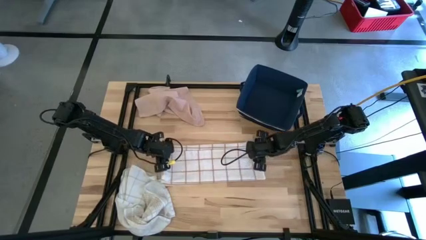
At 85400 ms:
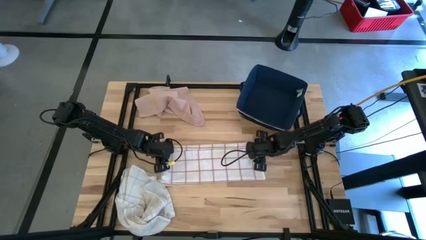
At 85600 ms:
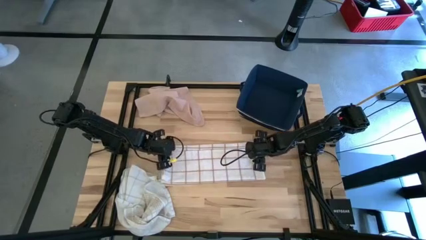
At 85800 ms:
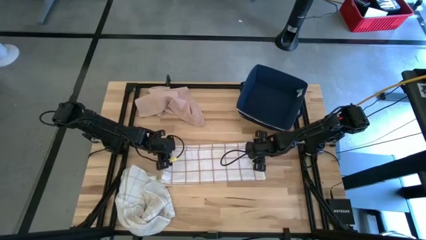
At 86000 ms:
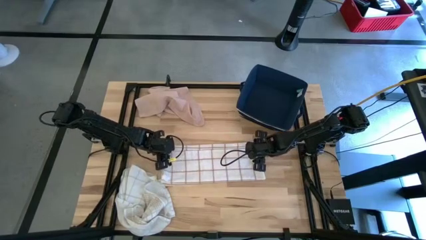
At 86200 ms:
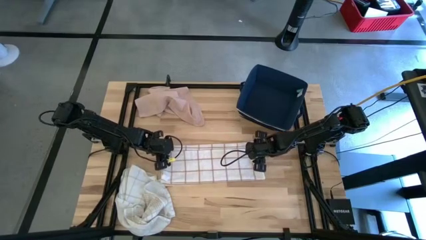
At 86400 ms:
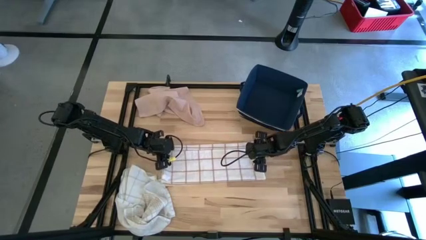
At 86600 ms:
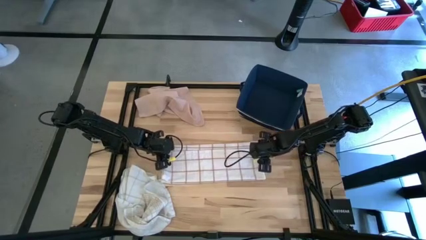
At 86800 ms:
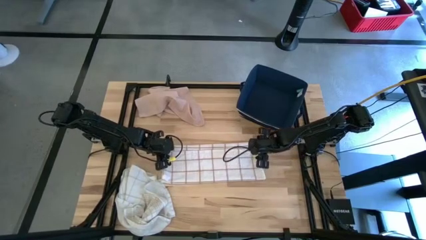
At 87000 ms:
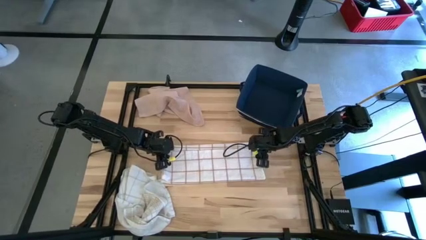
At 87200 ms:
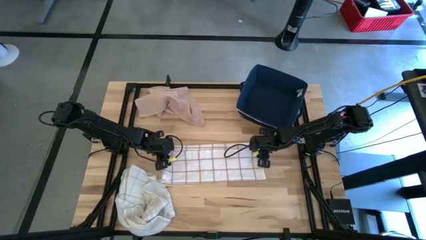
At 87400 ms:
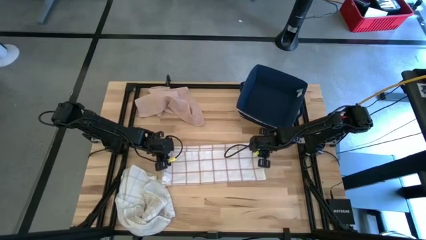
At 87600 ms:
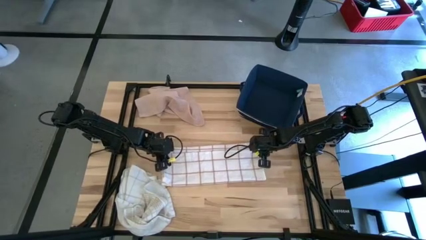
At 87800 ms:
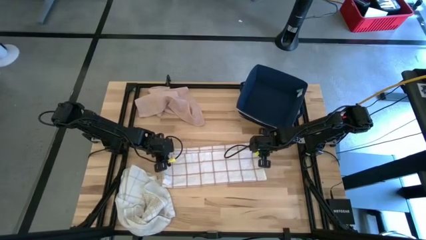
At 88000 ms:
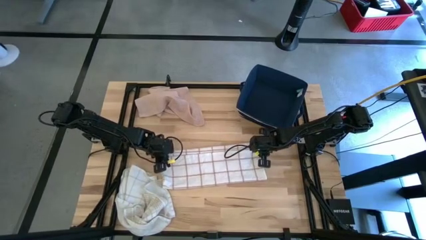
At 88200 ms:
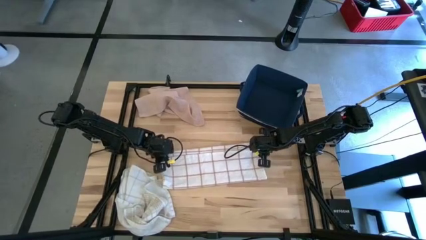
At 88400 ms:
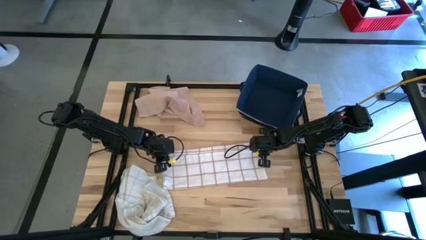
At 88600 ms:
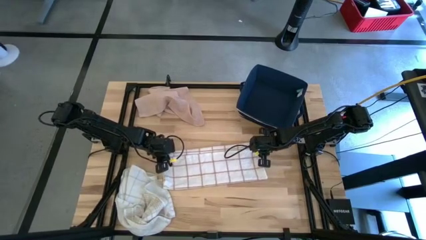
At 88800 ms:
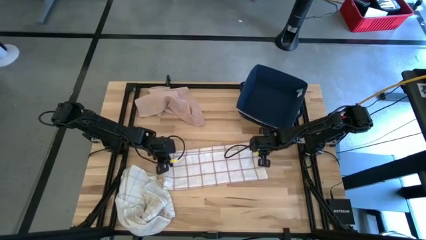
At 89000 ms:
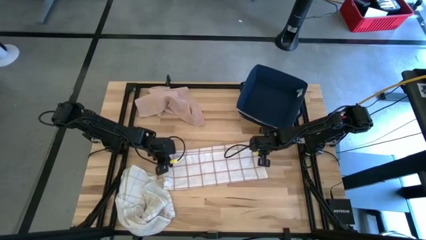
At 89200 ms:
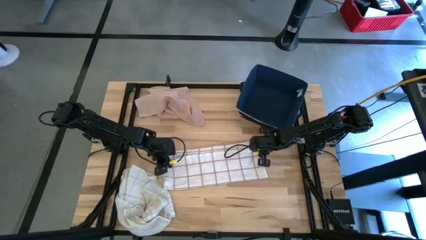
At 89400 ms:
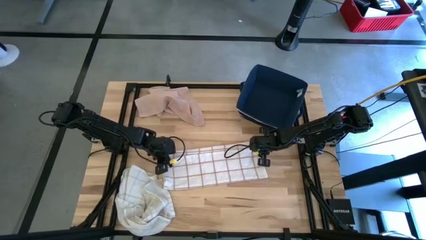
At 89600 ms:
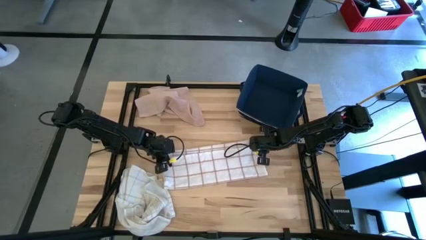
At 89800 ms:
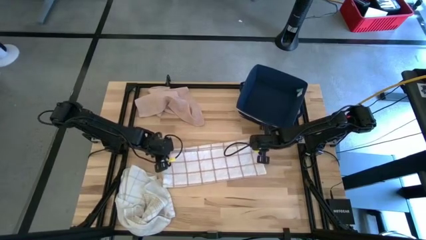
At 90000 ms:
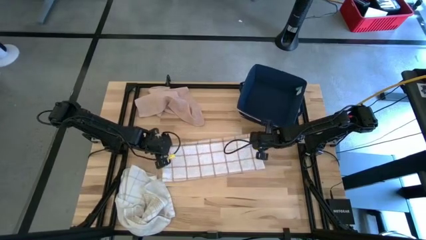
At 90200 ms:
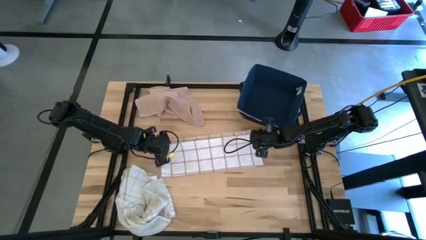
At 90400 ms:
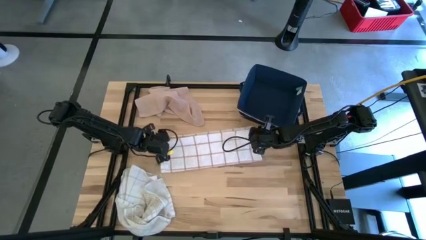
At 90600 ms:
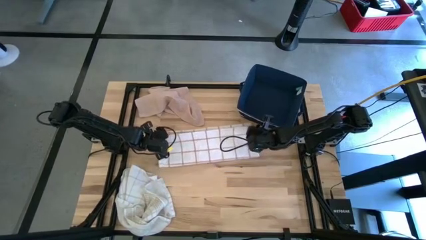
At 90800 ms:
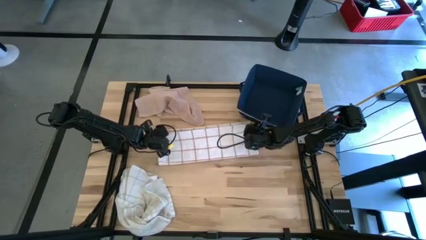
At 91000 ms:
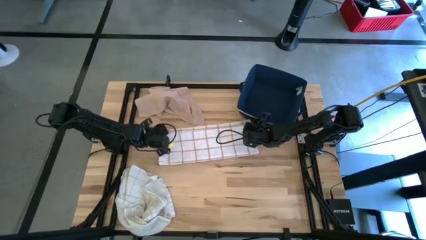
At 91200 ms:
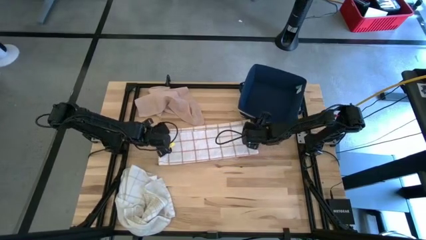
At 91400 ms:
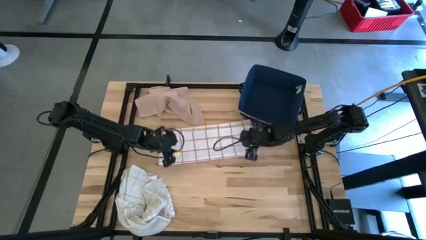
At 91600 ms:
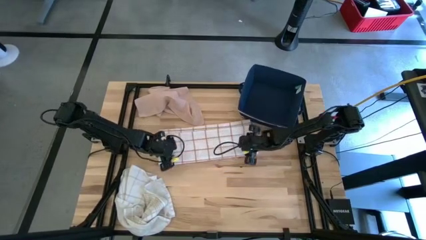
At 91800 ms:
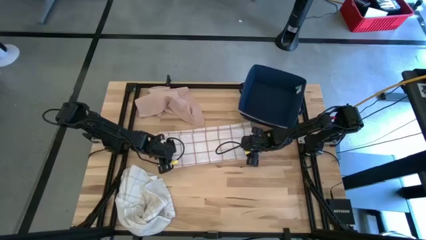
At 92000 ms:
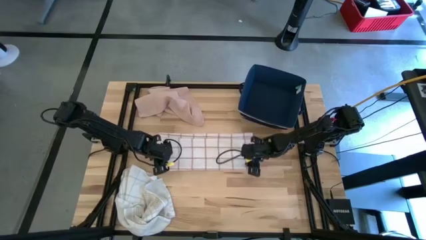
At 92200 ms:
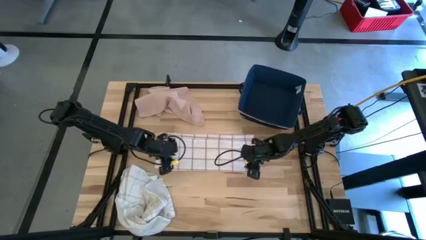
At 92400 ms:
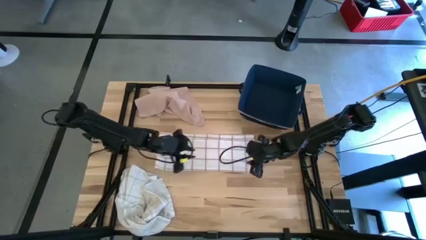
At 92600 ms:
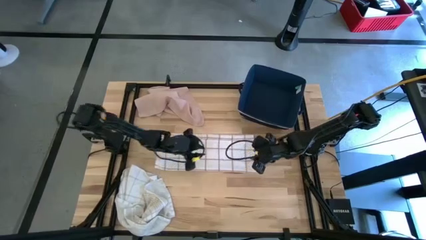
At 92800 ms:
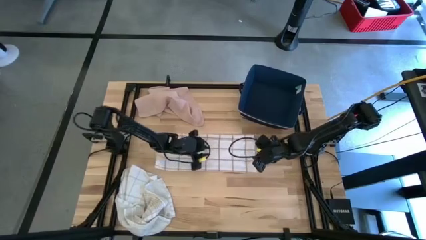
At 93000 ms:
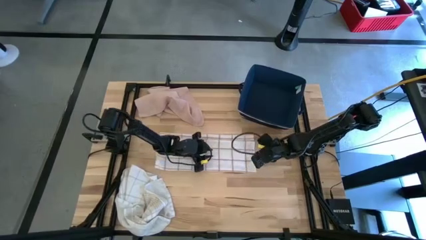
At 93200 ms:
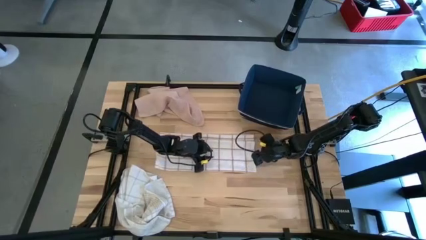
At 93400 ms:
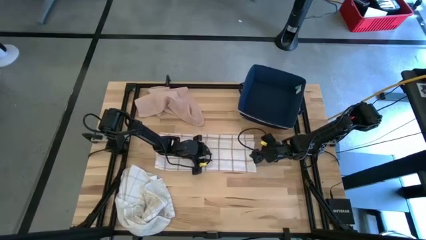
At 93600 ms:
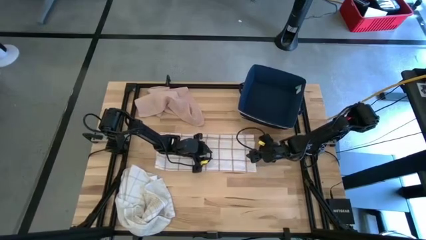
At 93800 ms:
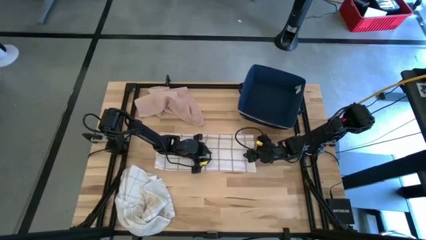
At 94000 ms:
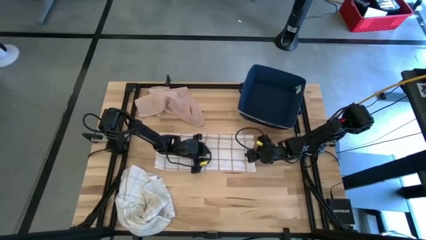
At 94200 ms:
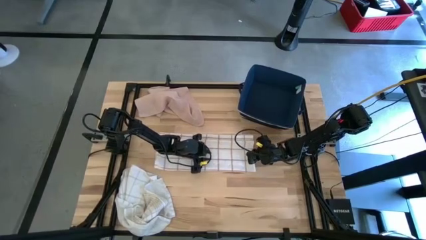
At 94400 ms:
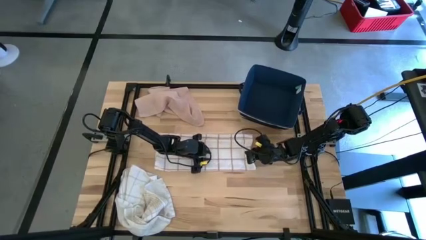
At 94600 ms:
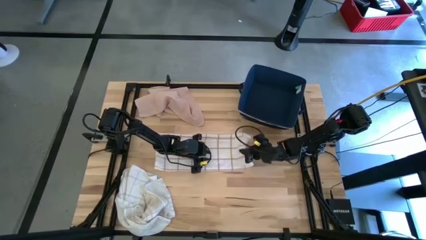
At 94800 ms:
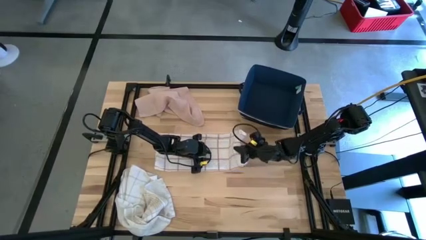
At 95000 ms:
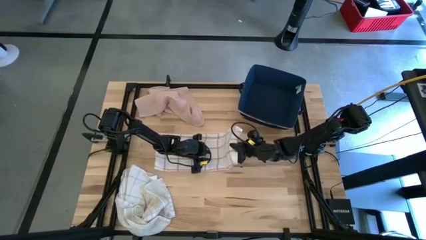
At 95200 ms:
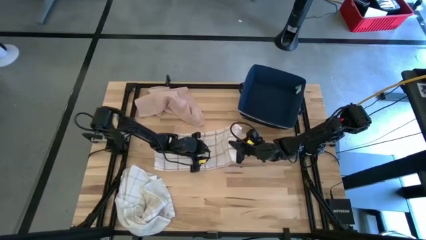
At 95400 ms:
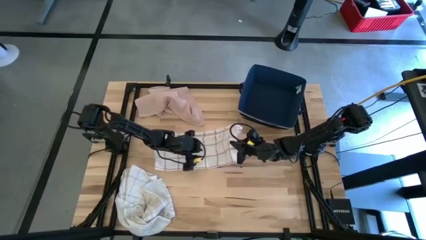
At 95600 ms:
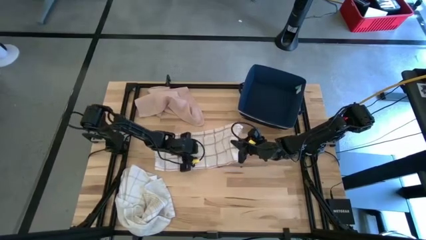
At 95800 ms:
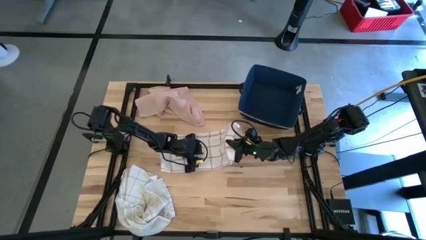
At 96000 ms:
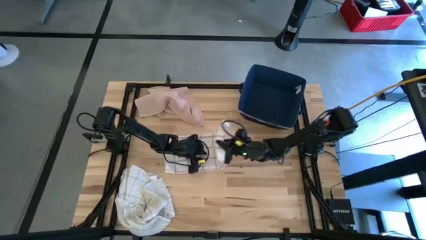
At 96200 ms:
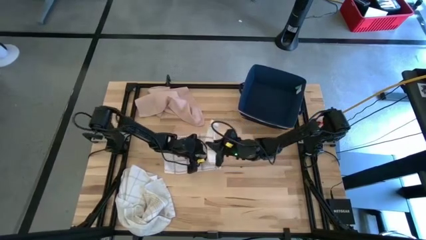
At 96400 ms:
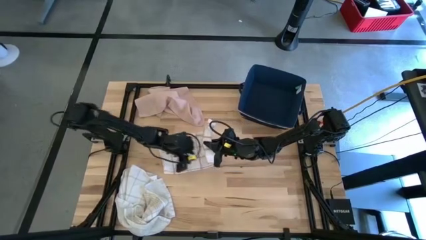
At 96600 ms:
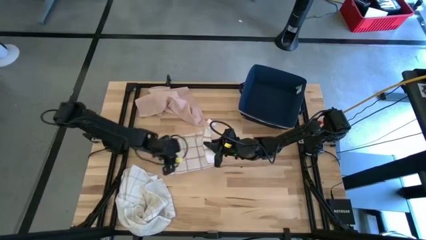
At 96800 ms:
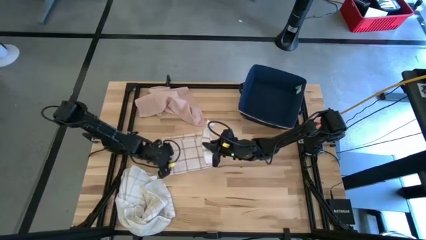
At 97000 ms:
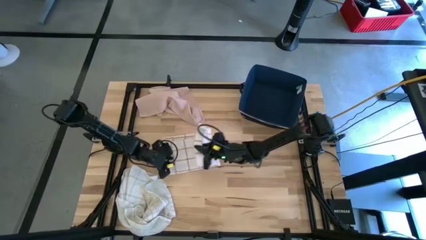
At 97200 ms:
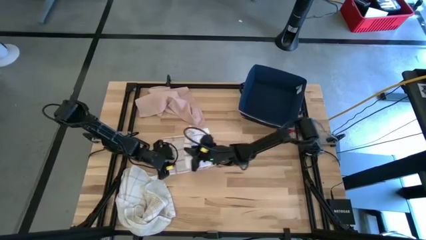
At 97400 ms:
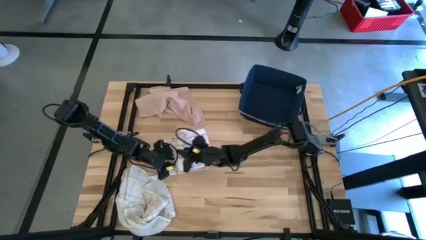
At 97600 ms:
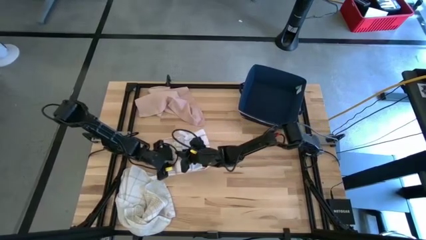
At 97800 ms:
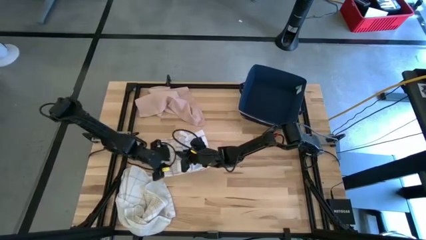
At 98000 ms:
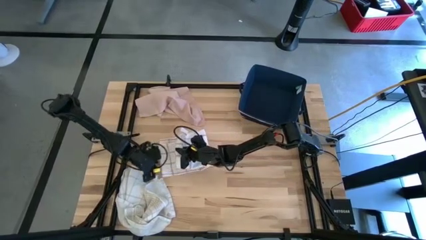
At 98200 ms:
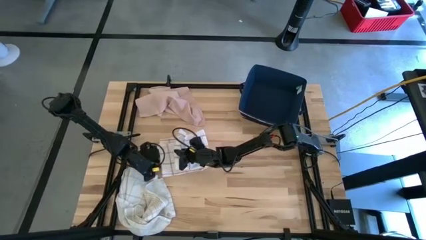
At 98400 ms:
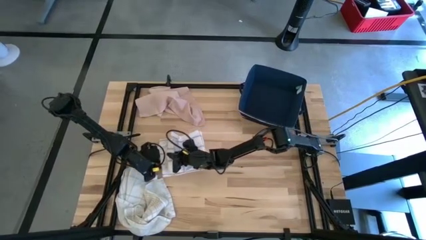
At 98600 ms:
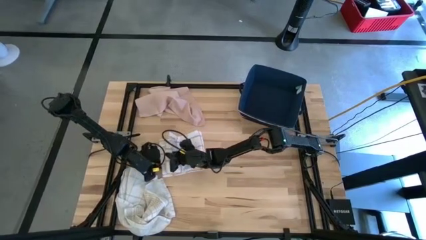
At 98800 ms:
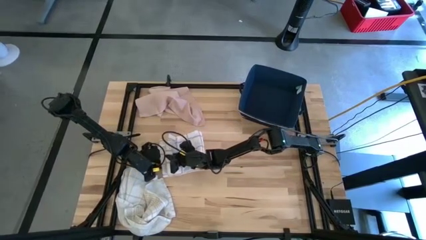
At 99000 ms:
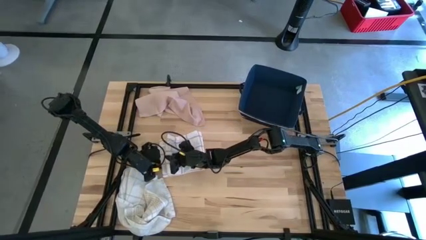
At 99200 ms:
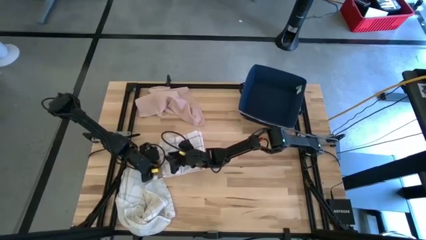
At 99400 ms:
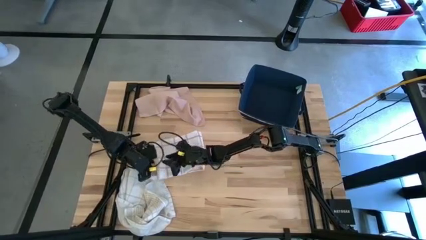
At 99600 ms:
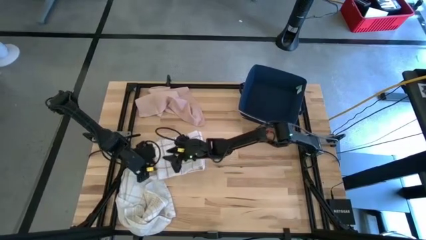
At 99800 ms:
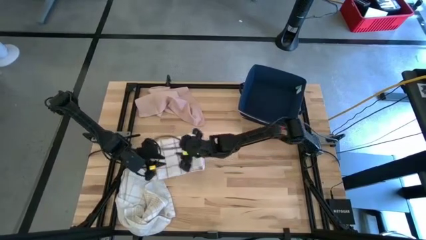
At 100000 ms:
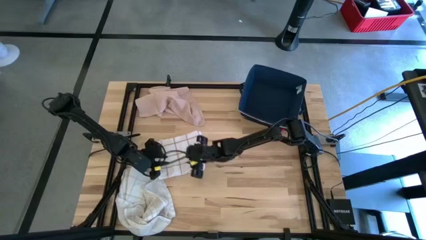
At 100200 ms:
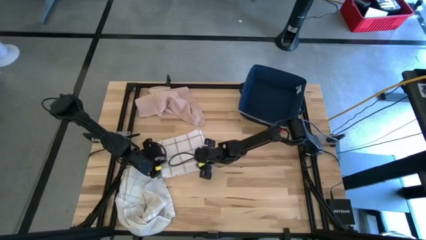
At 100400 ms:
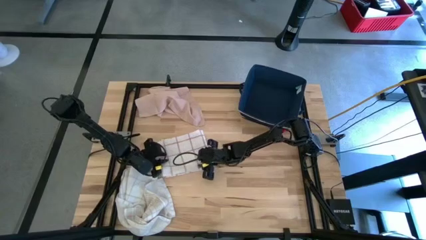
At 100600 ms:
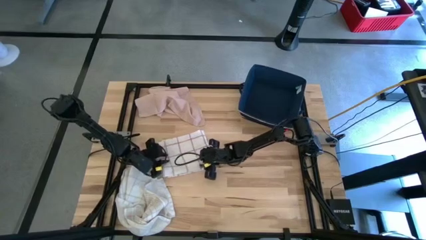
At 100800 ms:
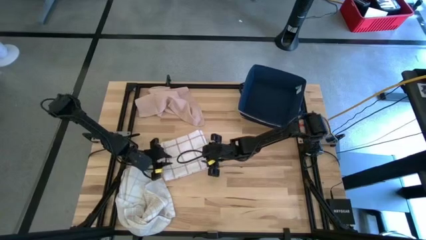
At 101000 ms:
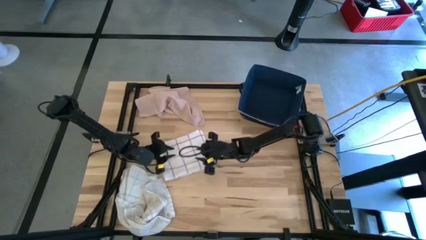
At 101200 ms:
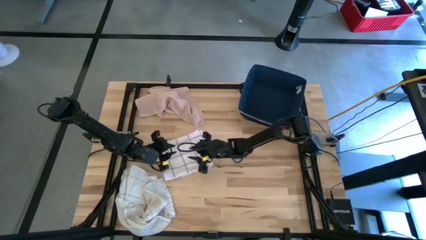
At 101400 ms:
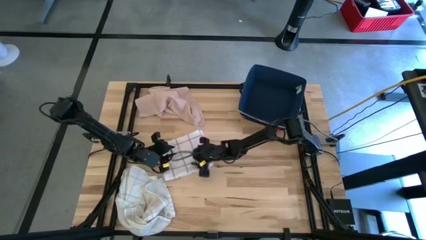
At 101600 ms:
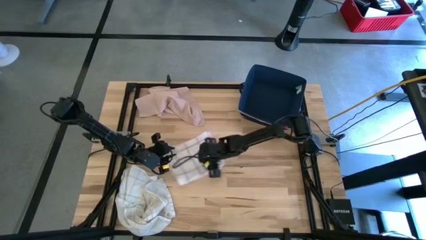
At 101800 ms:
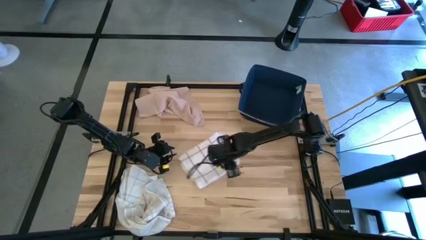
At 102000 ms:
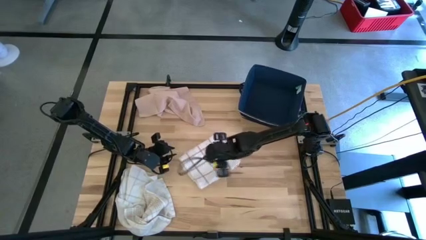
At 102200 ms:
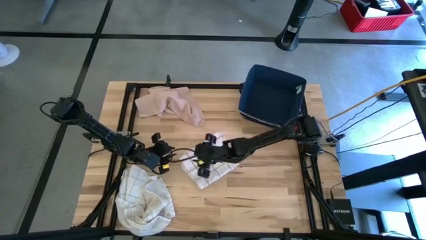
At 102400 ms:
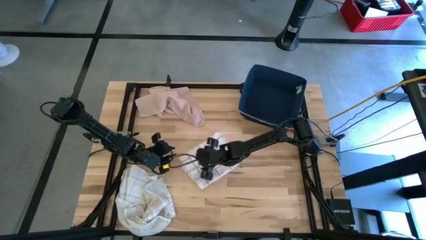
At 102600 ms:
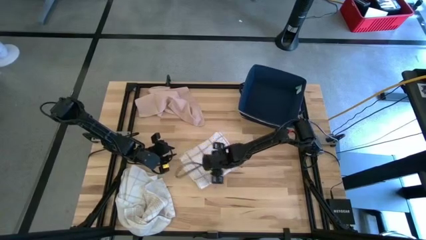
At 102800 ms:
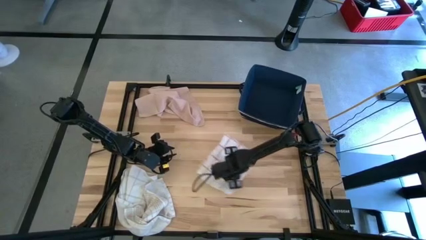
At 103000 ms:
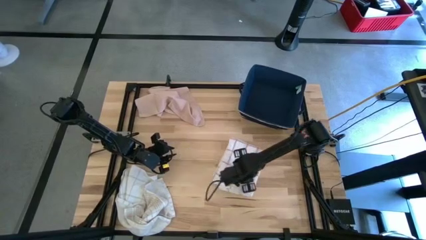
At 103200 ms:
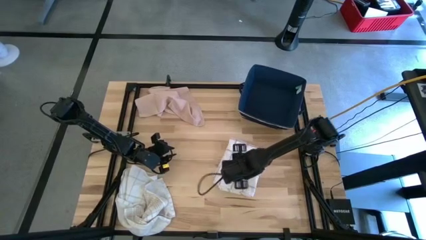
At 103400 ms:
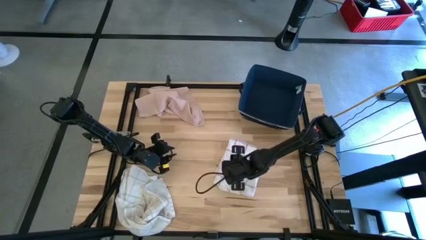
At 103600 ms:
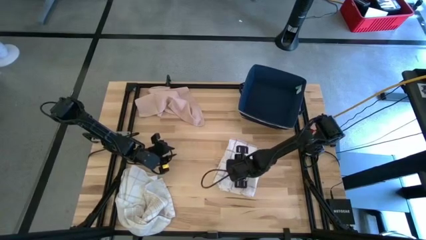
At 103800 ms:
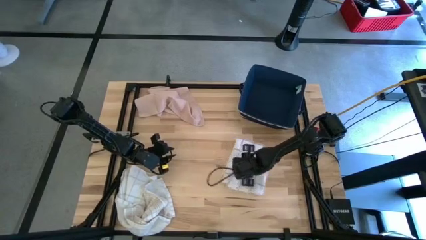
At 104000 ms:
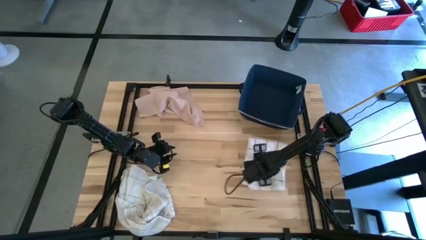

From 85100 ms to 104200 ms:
Task: Fold towel
Fold the white with red-stripe towel
